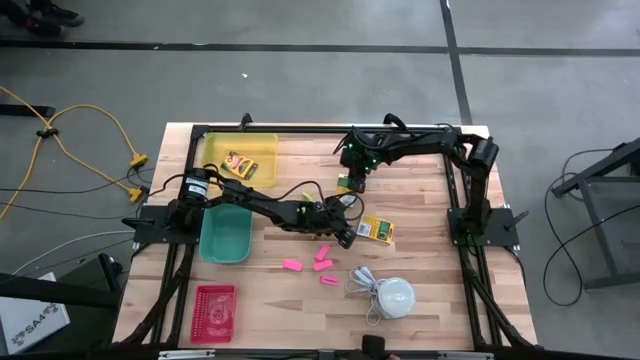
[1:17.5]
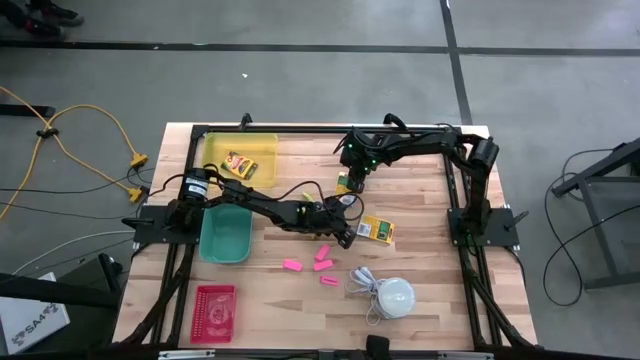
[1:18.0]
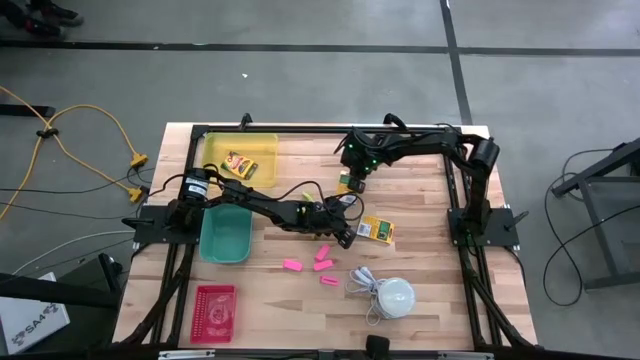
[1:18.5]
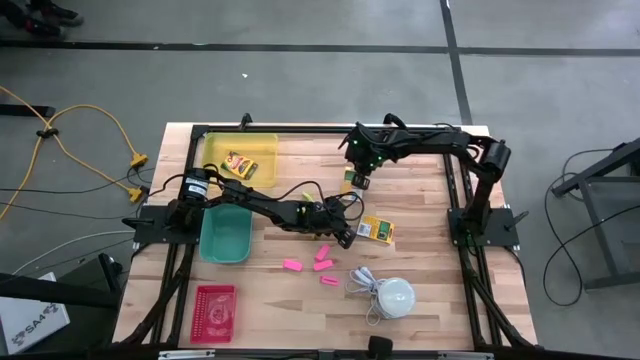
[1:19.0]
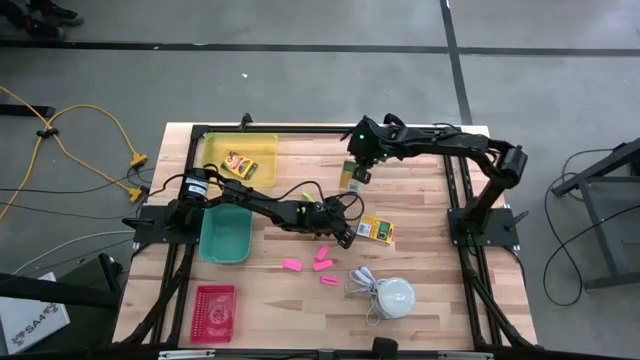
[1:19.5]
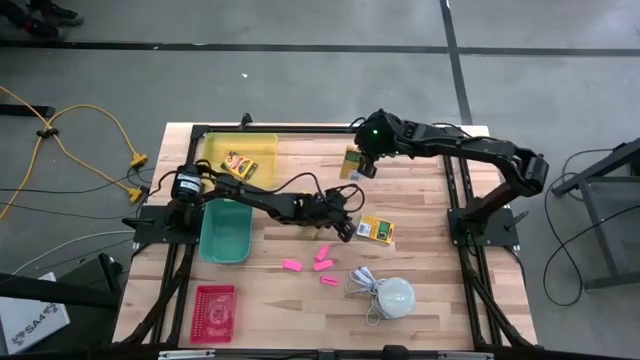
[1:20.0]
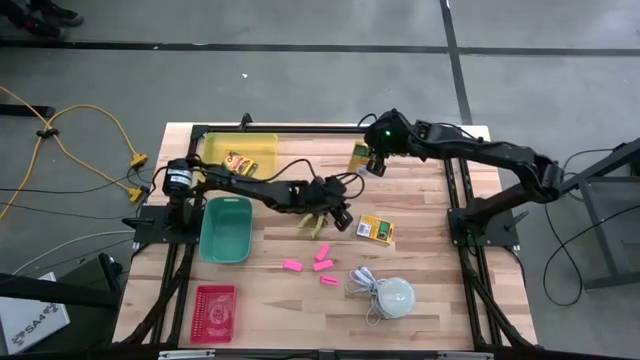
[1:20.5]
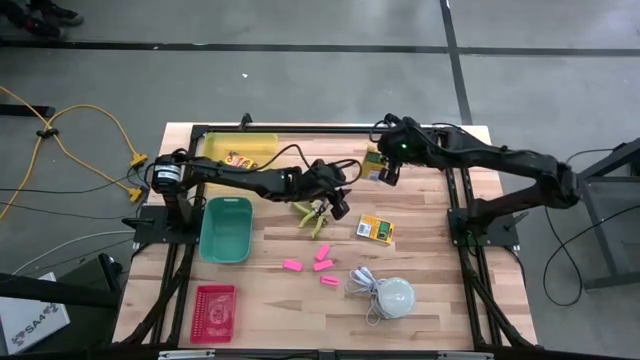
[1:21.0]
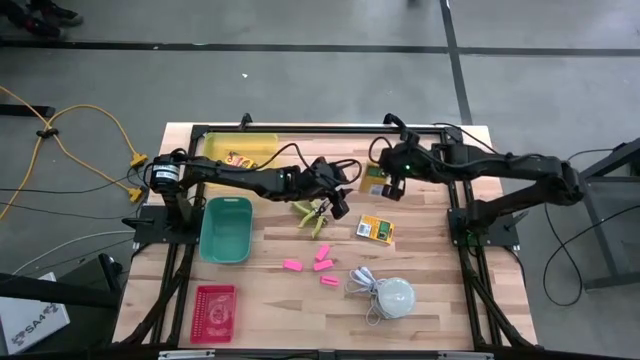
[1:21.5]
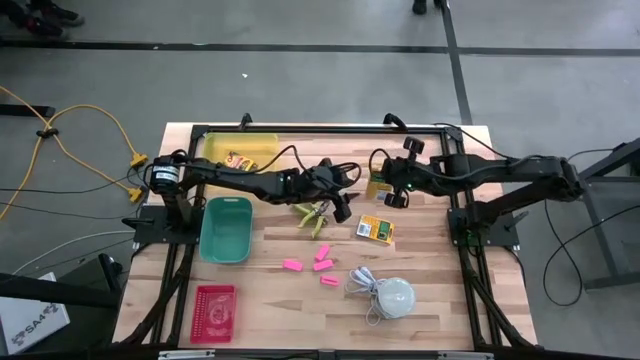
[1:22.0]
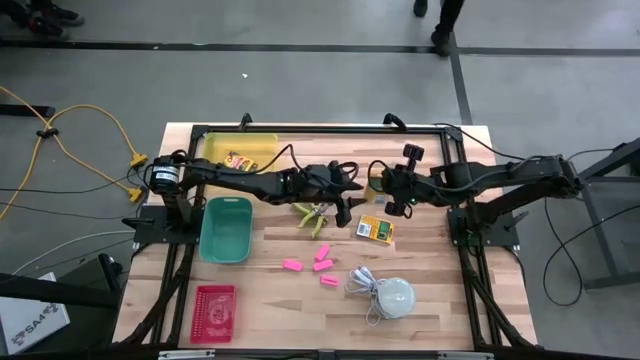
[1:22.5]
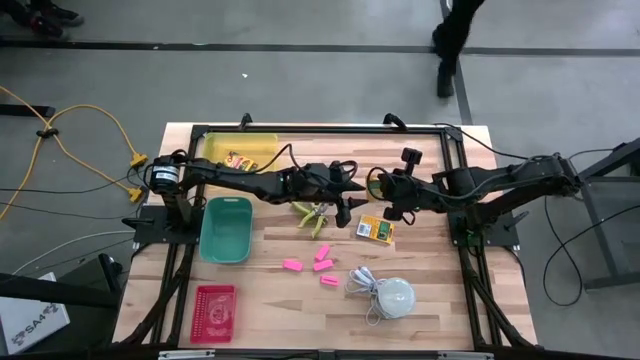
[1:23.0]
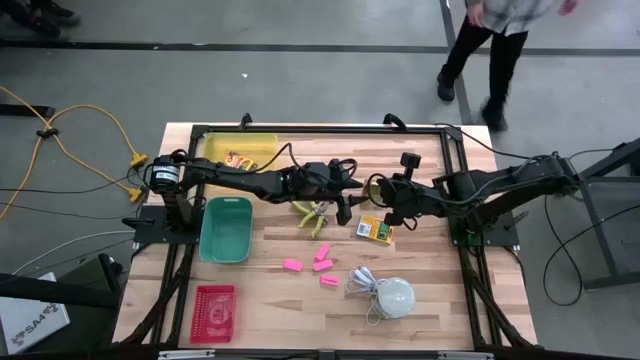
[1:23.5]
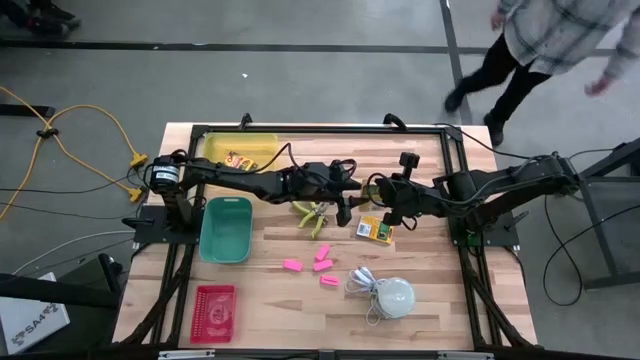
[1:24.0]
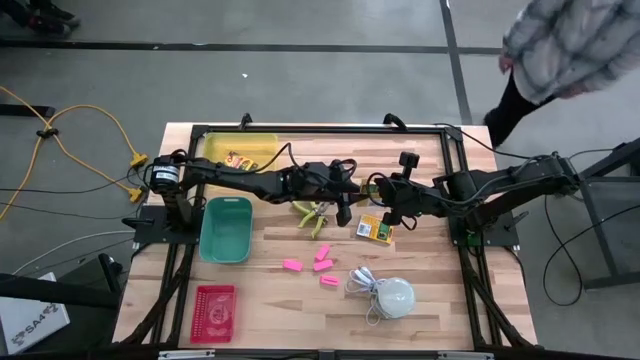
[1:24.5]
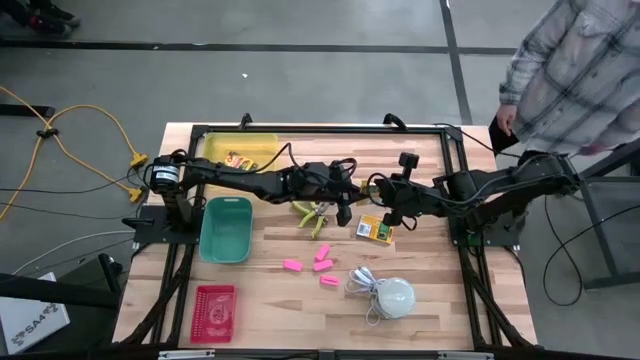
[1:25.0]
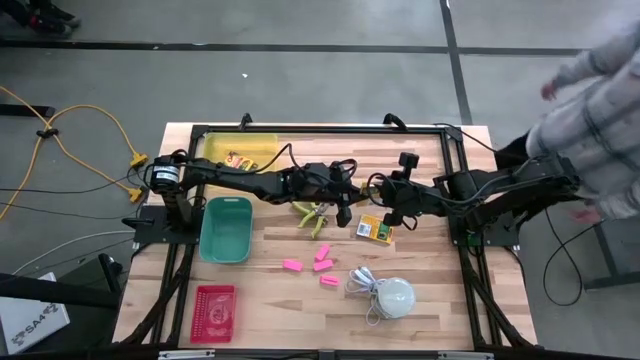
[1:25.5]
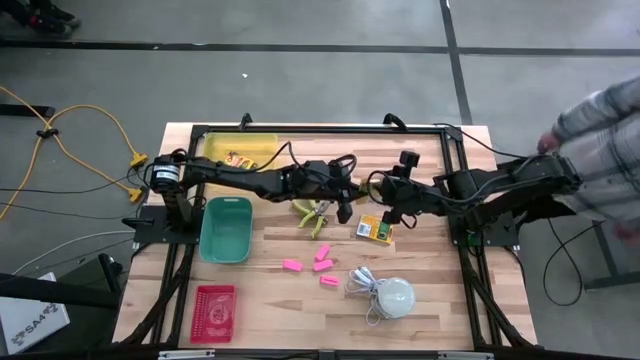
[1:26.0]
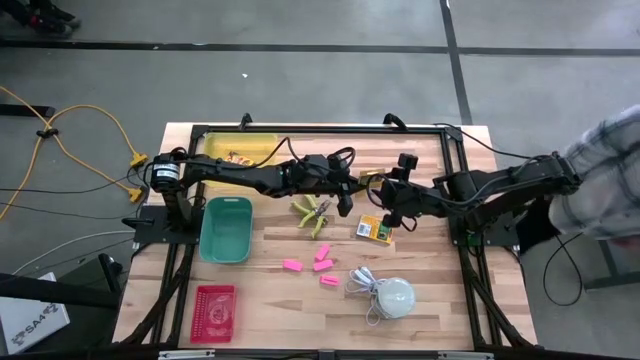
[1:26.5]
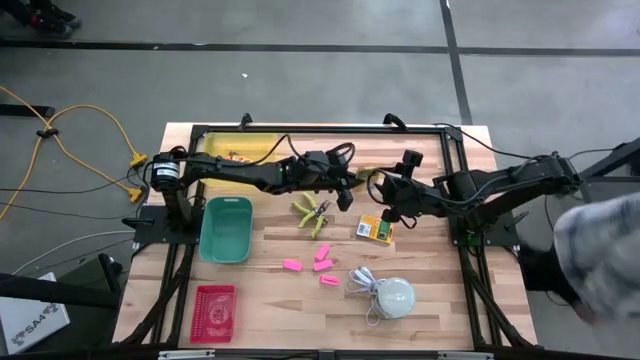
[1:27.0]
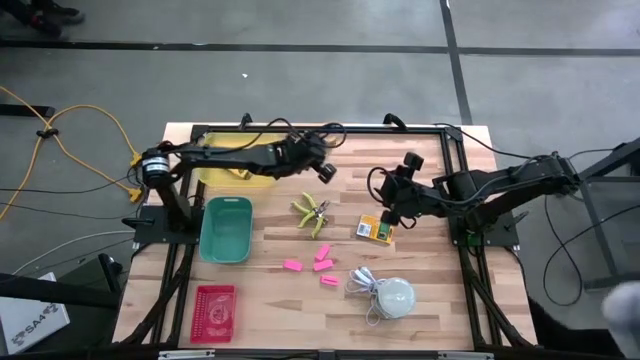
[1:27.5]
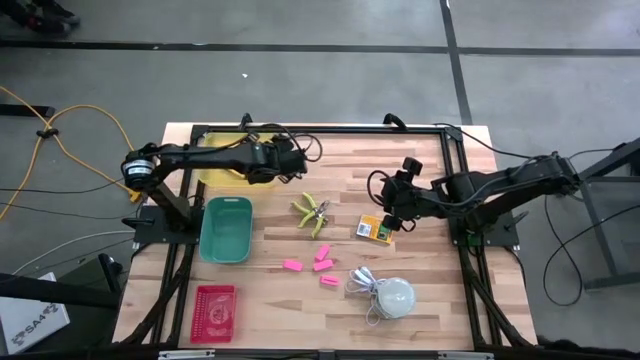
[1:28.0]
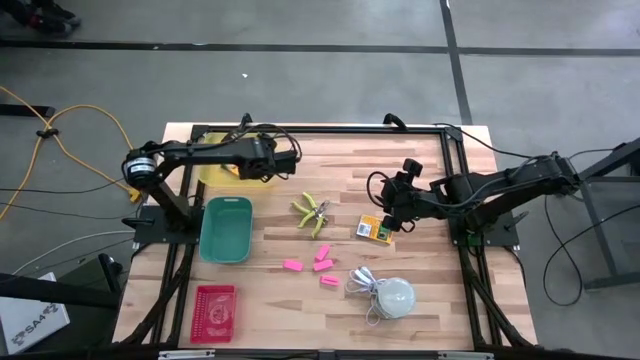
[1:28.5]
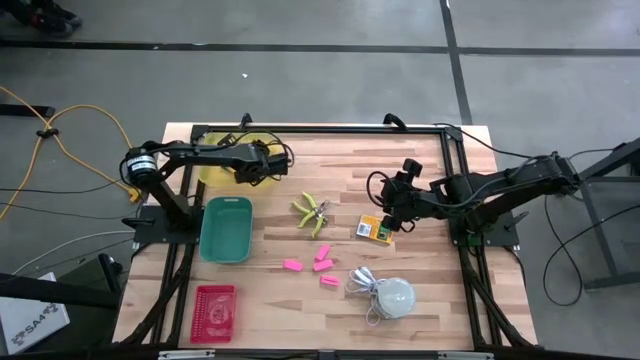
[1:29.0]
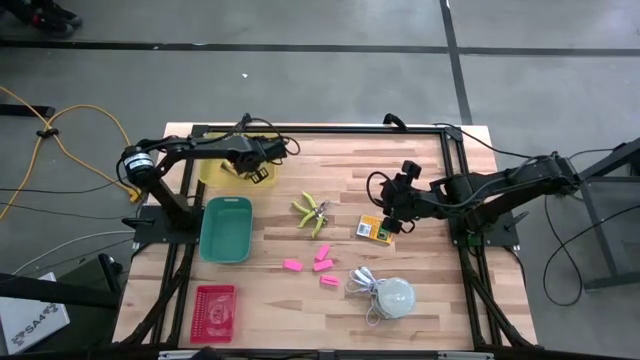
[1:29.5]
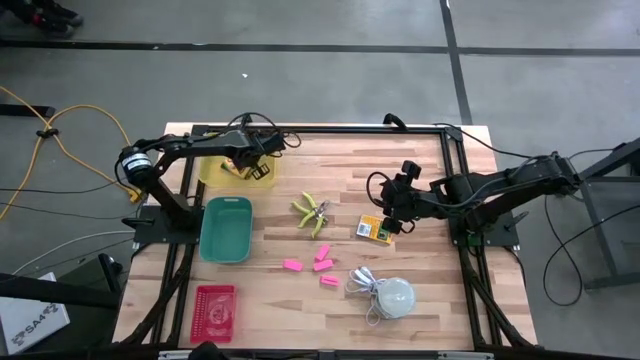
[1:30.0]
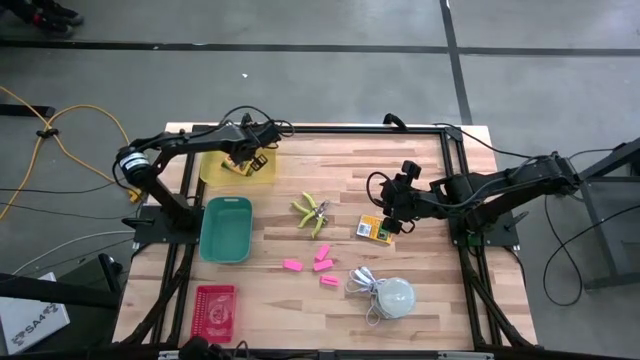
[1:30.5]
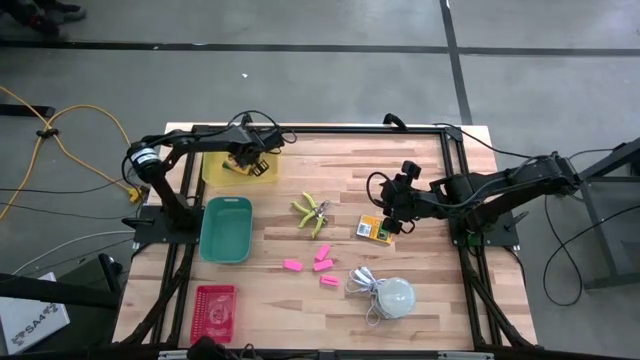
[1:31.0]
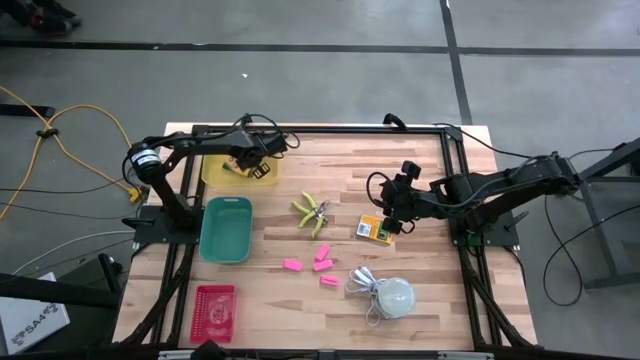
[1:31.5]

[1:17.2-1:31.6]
Task: Pick & Place School Supplies
Put the top yellow crayon box into the yellow bin

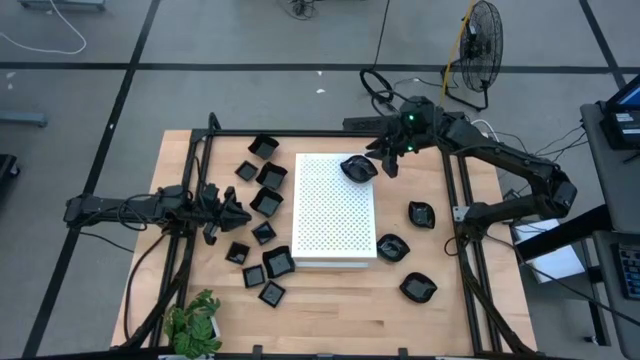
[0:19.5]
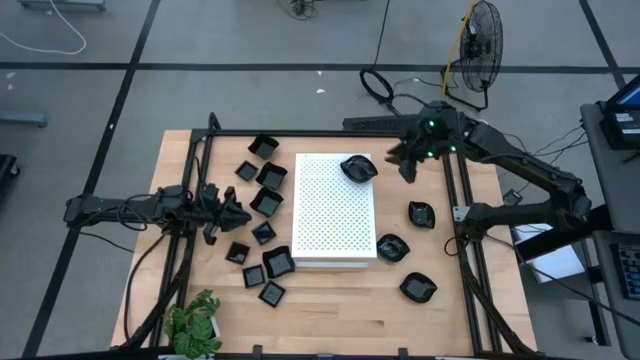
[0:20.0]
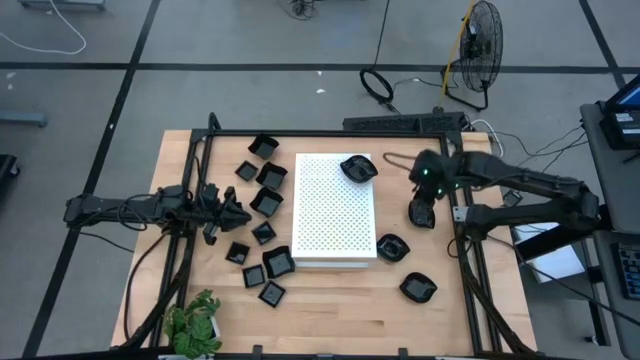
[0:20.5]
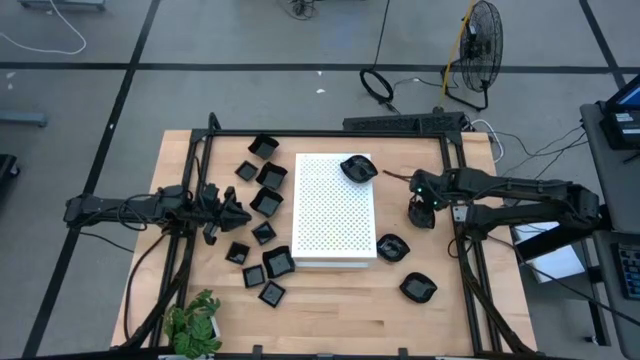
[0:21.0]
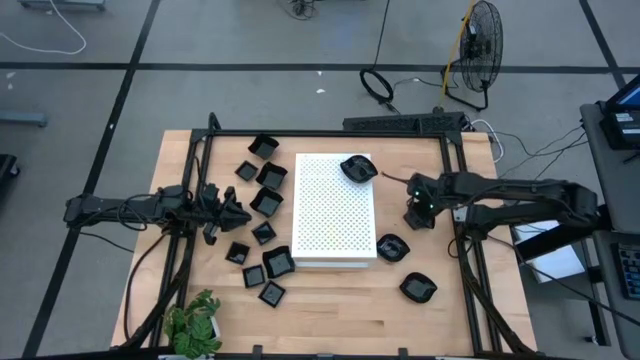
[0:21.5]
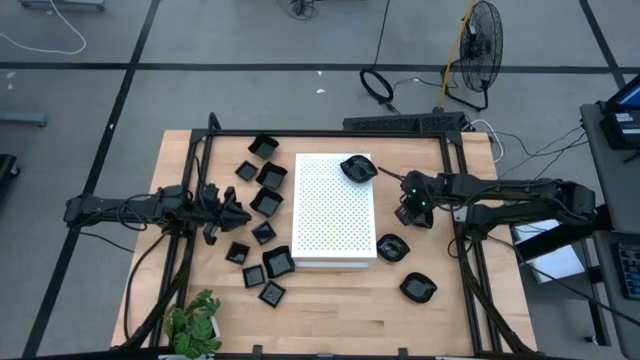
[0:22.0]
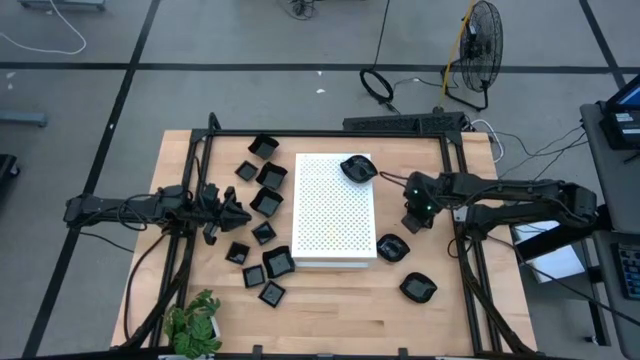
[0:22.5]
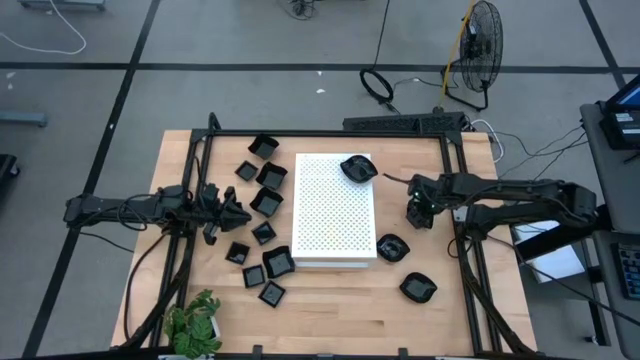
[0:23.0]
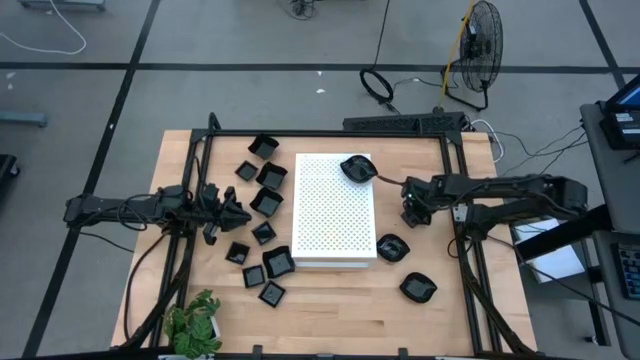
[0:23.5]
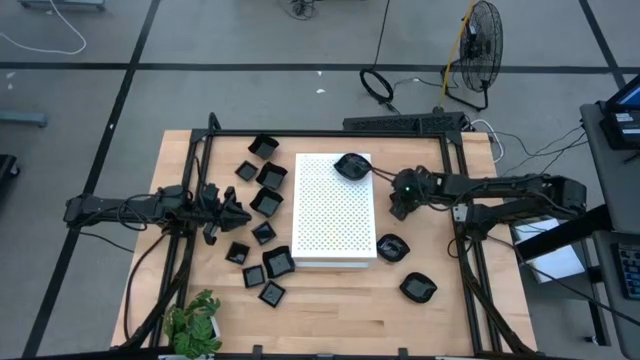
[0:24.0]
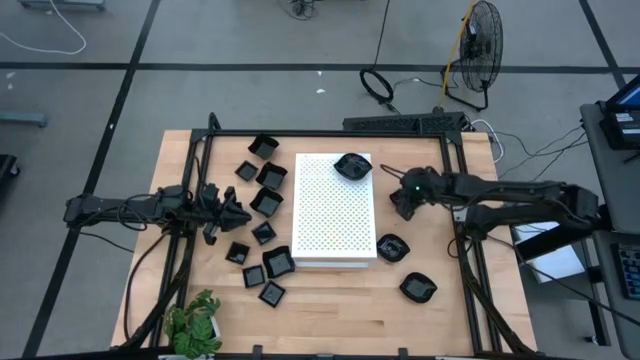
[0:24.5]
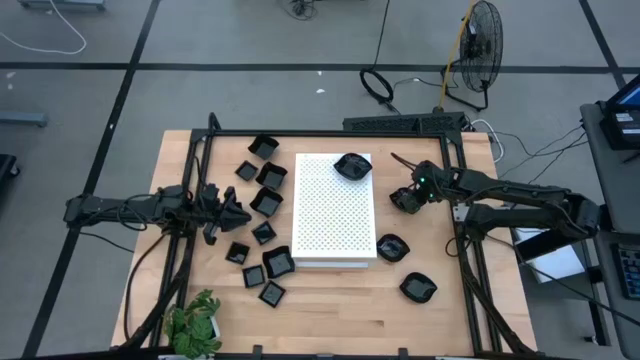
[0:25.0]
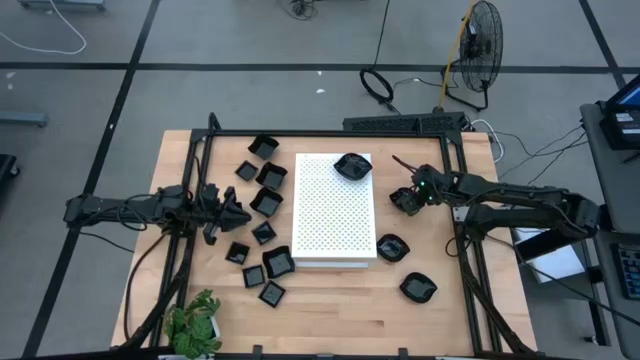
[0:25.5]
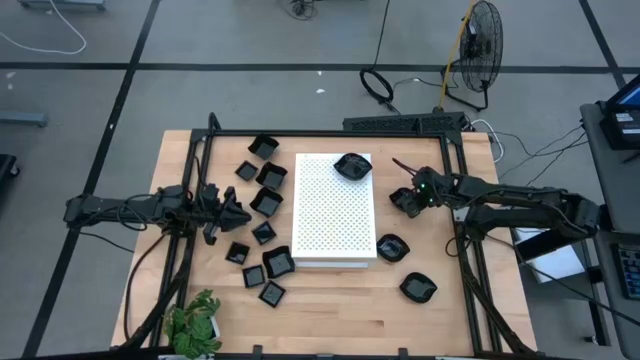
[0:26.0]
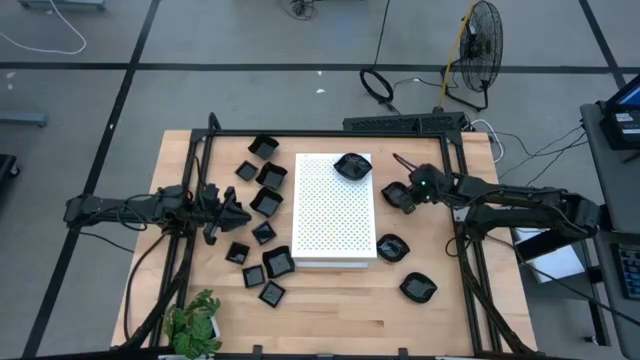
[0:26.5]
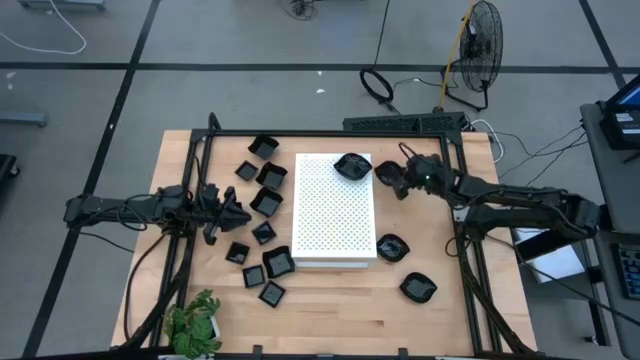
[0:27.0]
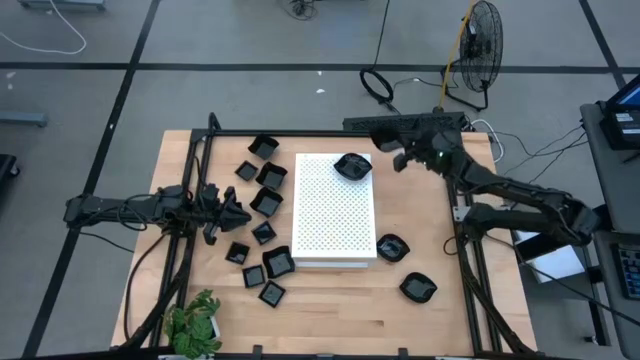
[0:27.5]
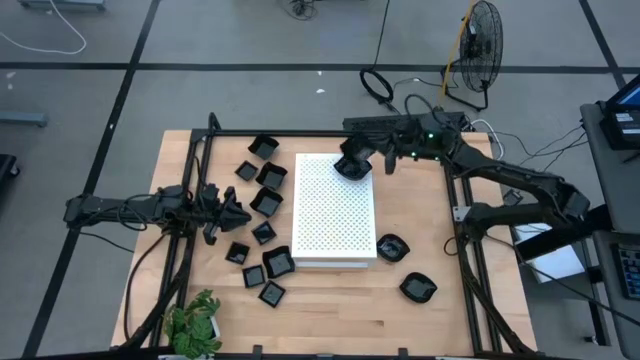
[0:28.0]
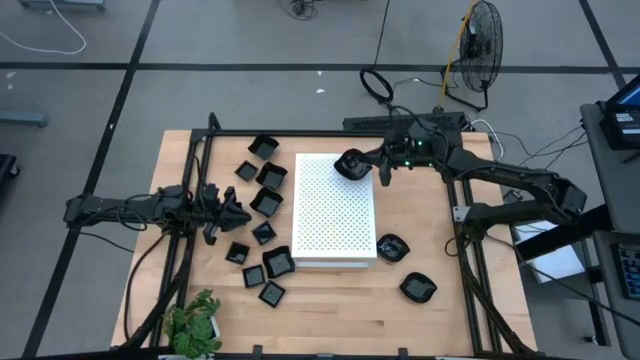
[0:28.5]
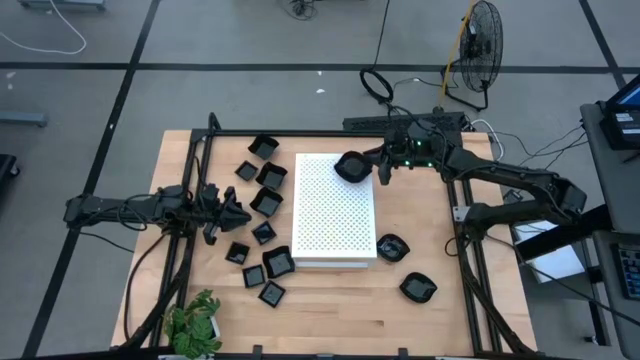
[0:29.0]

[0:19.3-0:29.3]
Task: Pick & Place Mini shaped plates
Stack the black leaf shaped plate on top of the other black leaf shaped plates on the shelf
